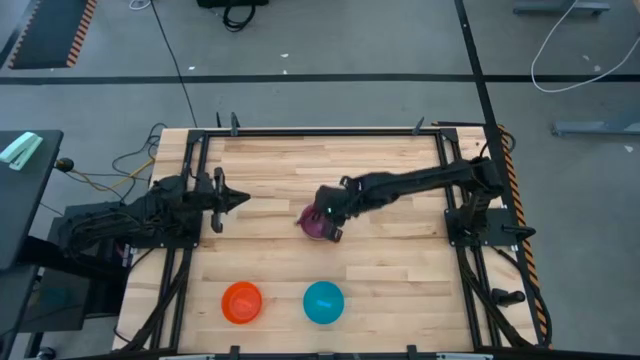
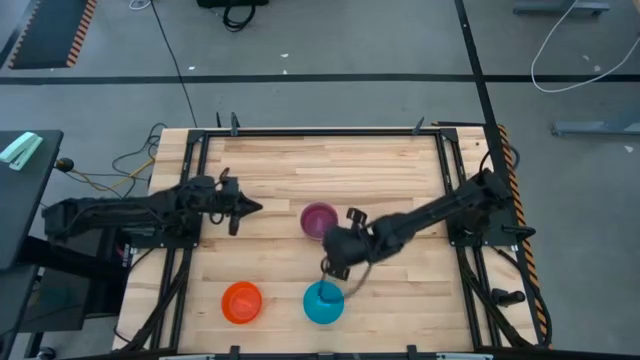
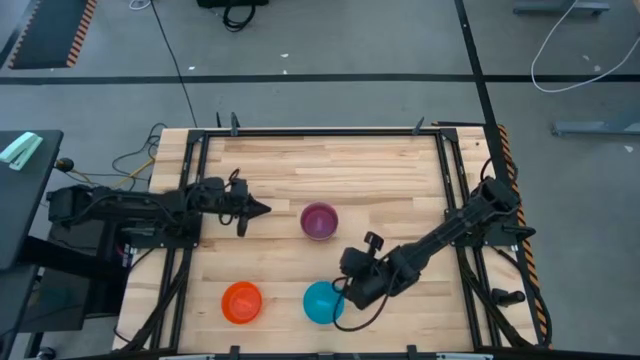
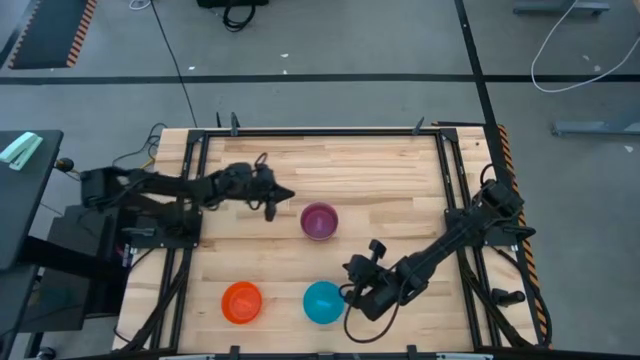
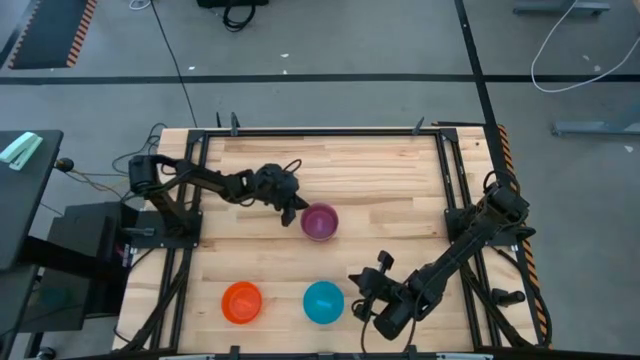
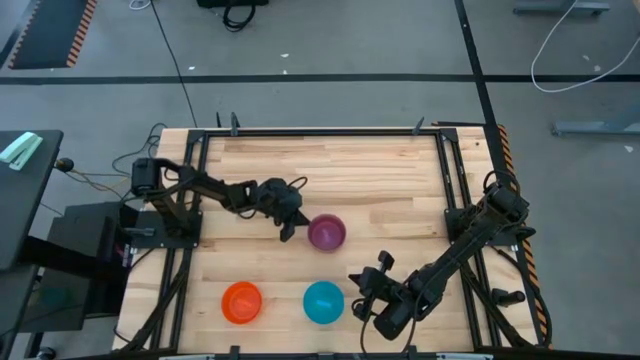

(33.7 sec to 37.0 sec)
Task: Nest bowls inside each other
Adjust the stacked bowls

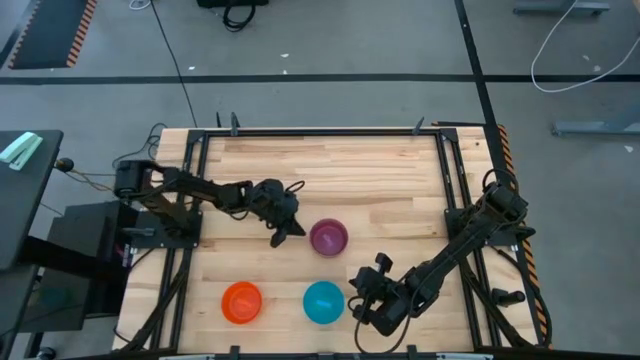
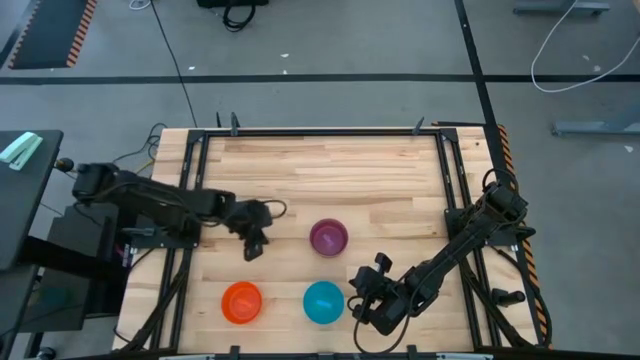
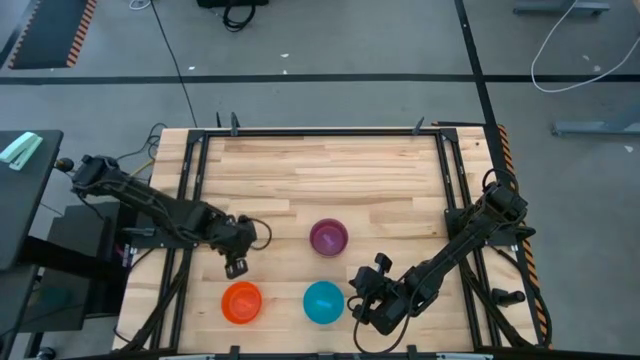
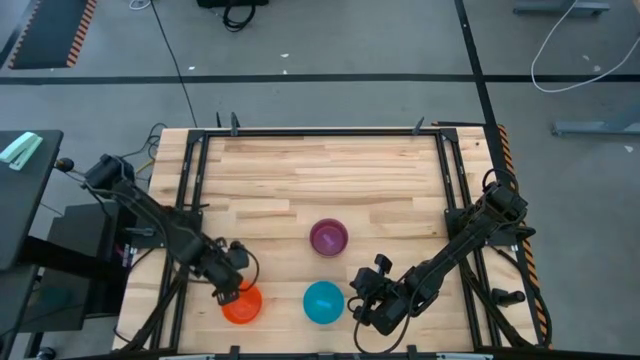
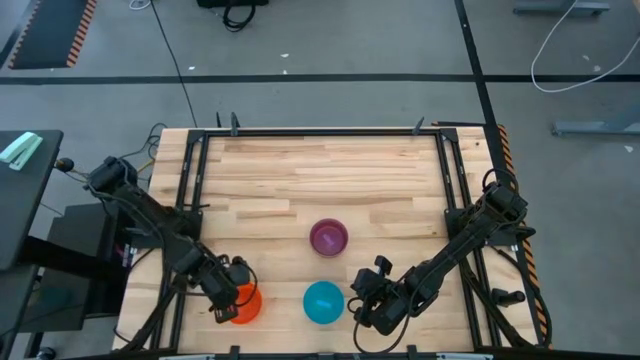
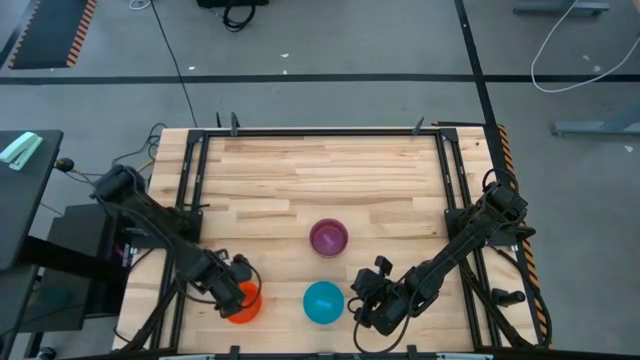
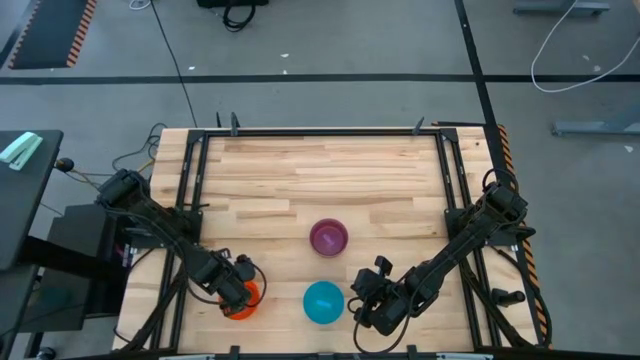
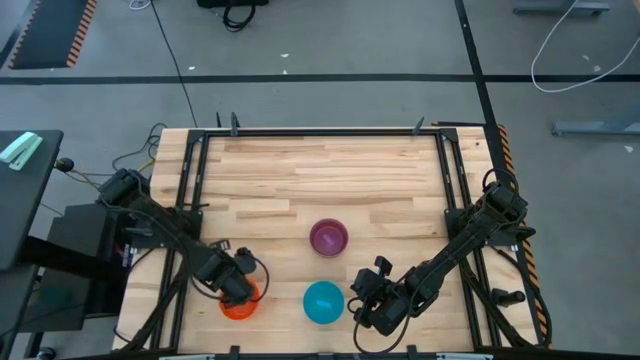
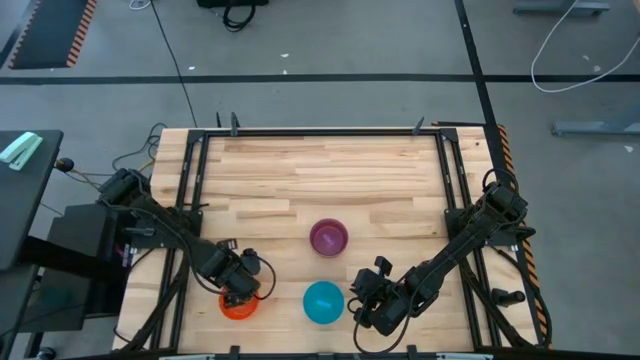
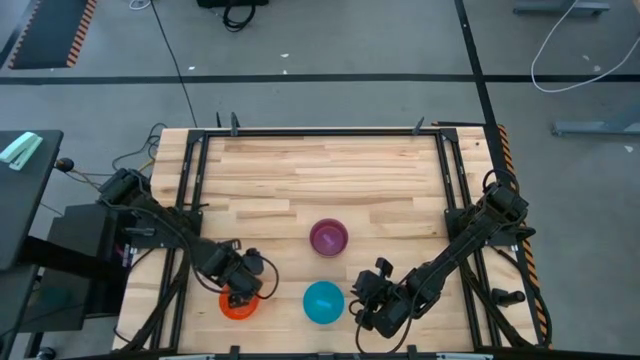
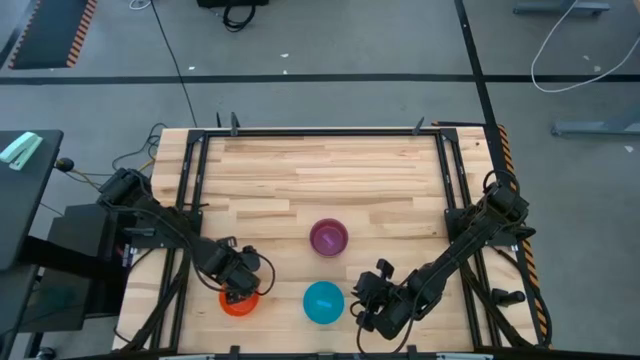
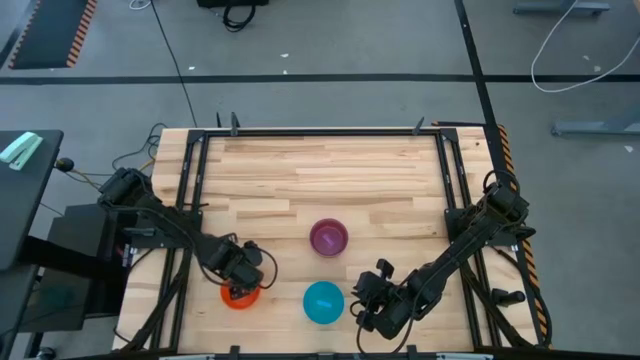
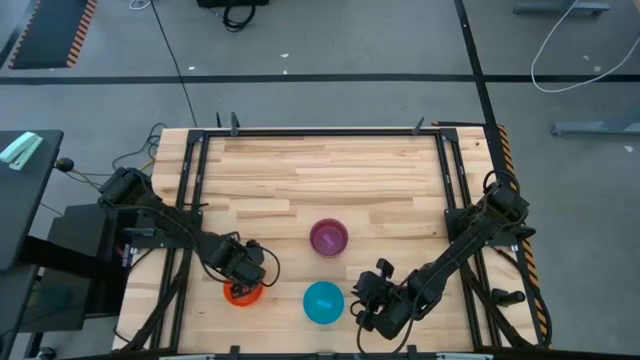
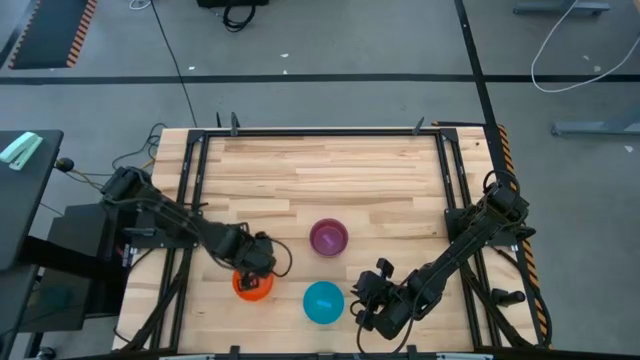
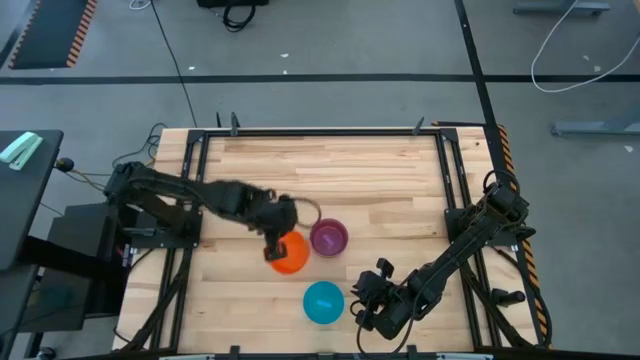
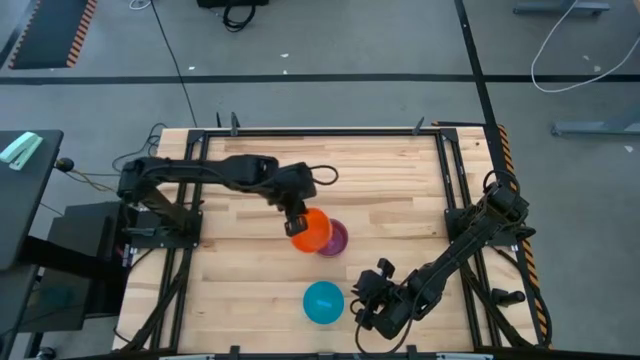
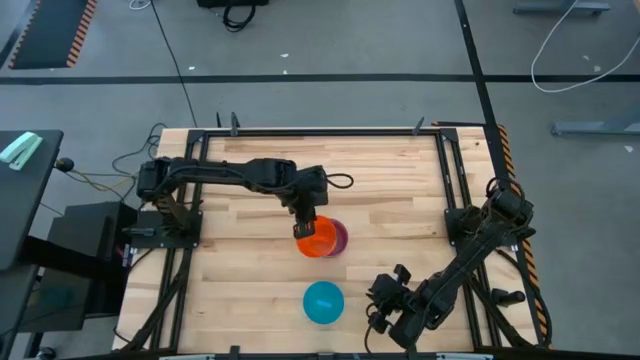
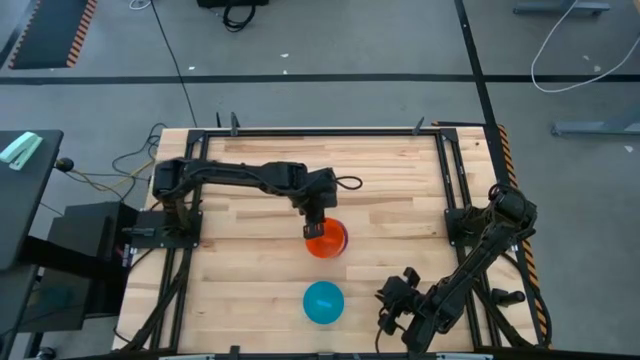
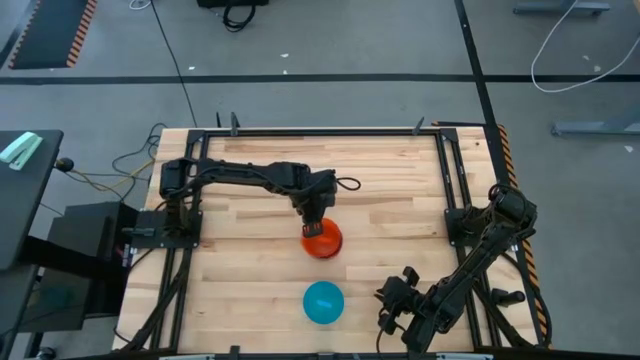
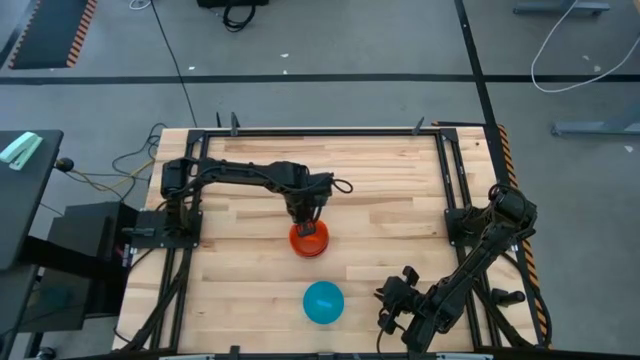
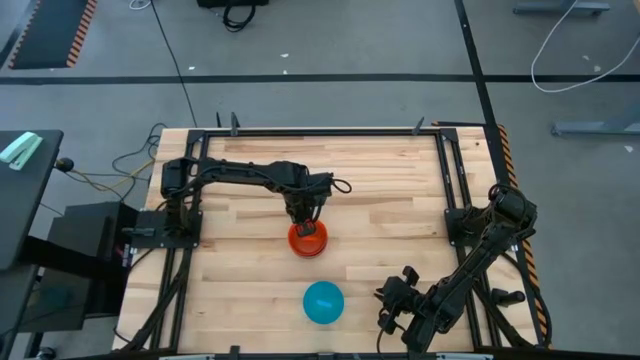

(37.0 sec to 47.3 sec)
Stack the orange bowl on top of the violet bowl

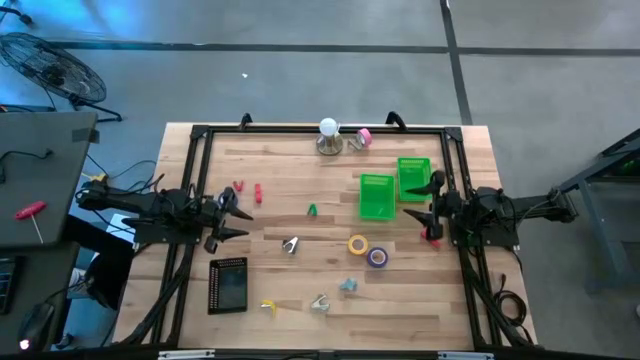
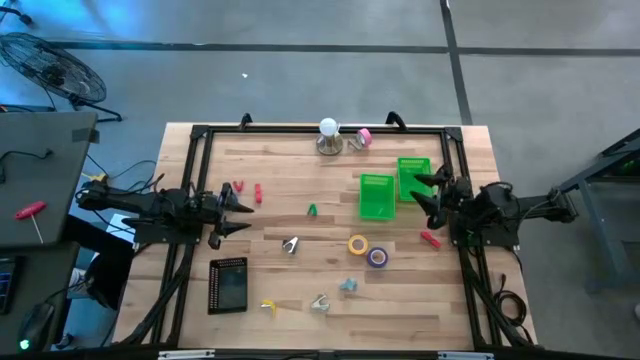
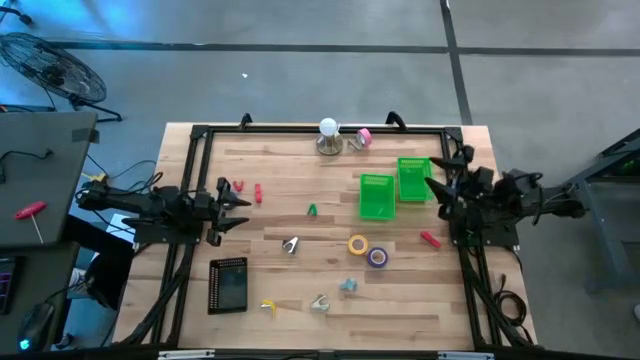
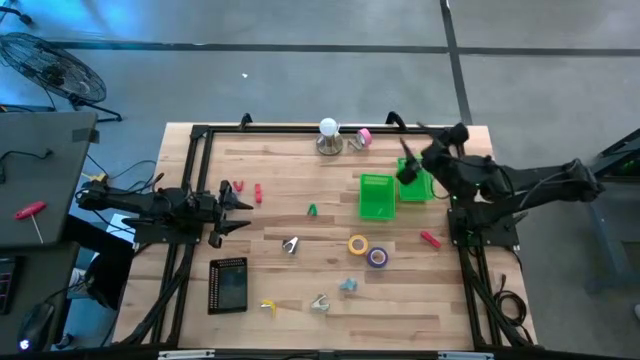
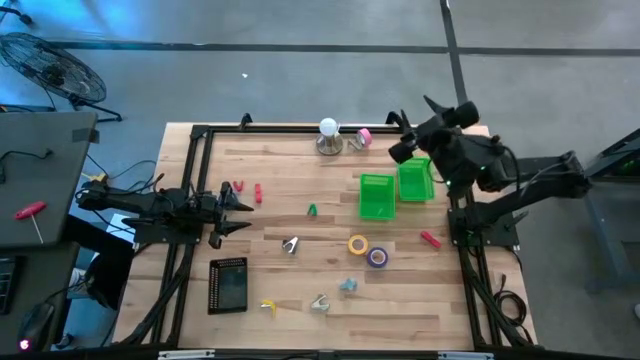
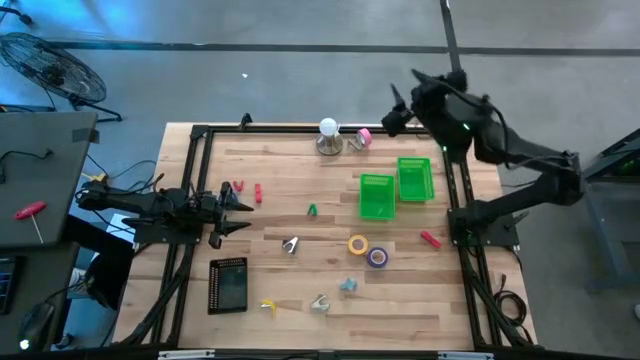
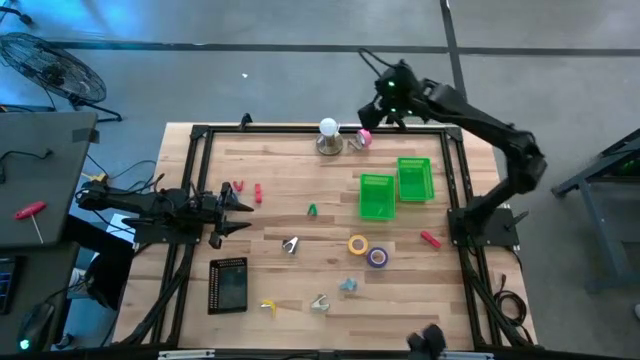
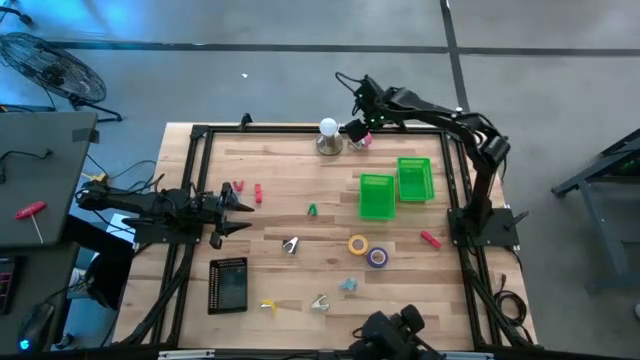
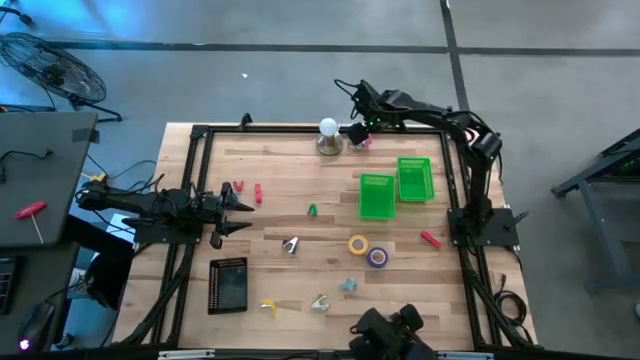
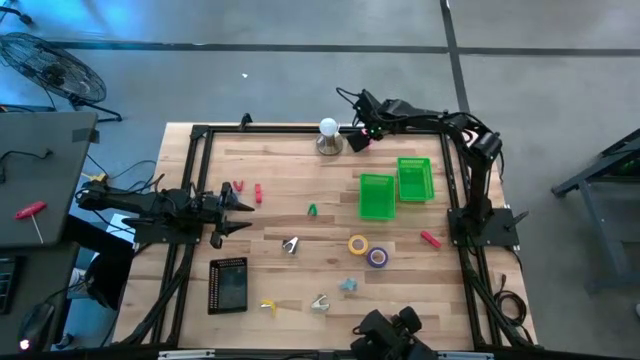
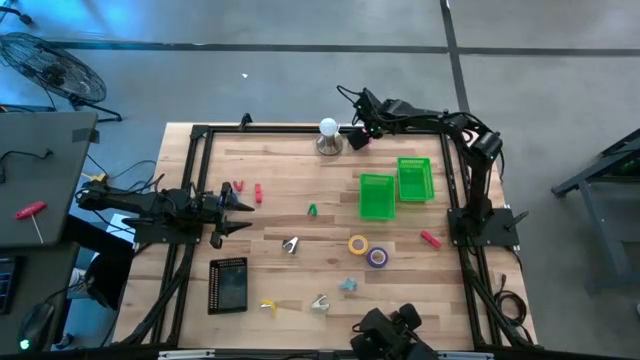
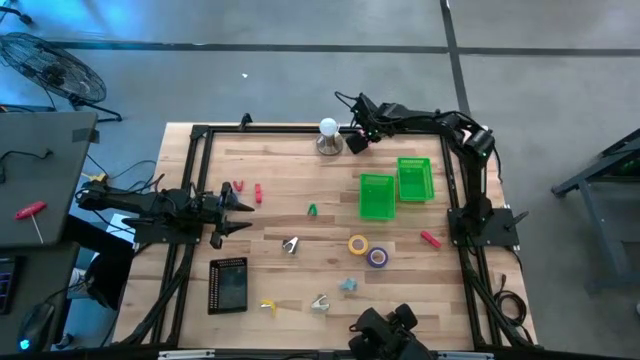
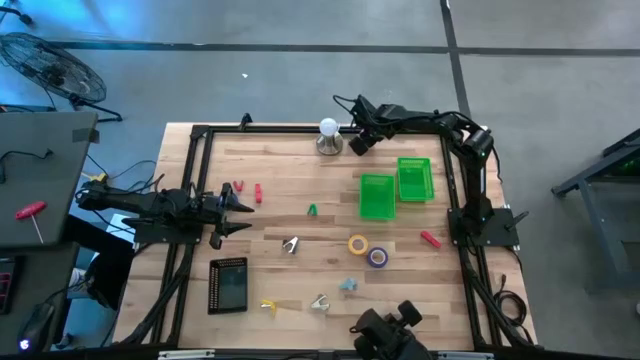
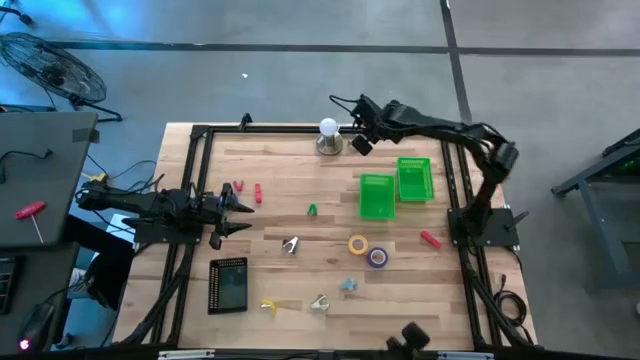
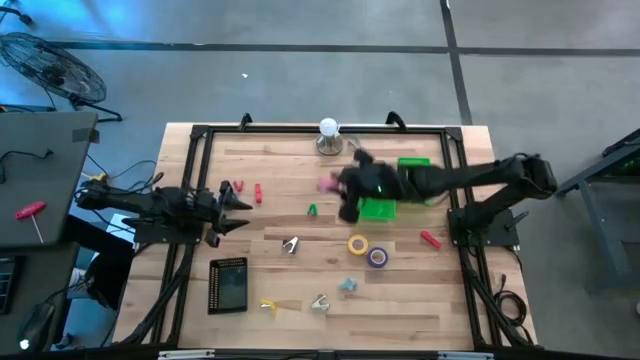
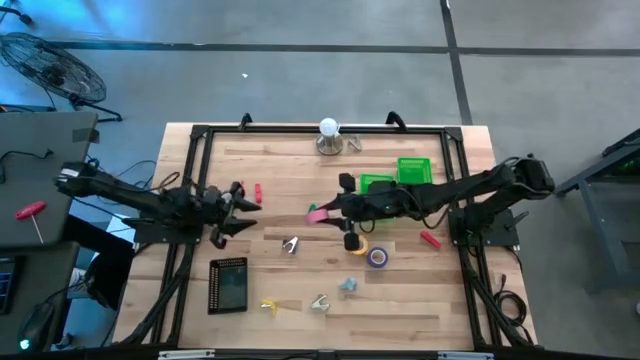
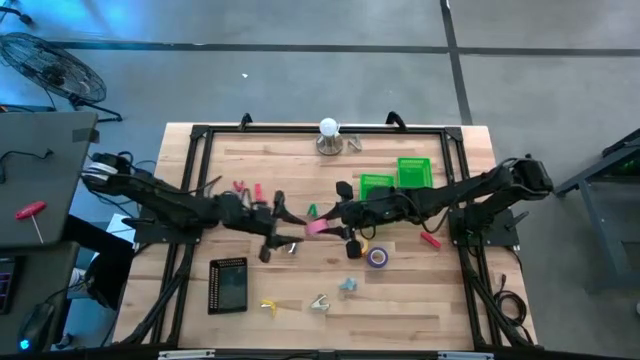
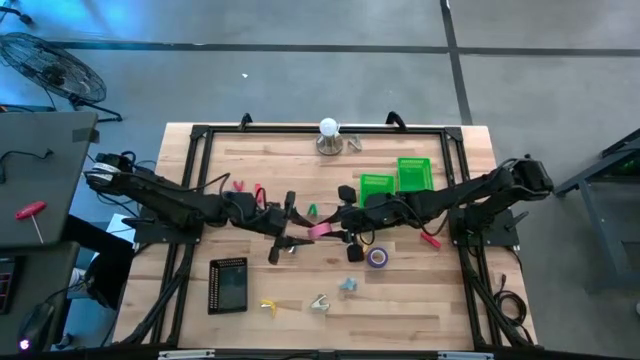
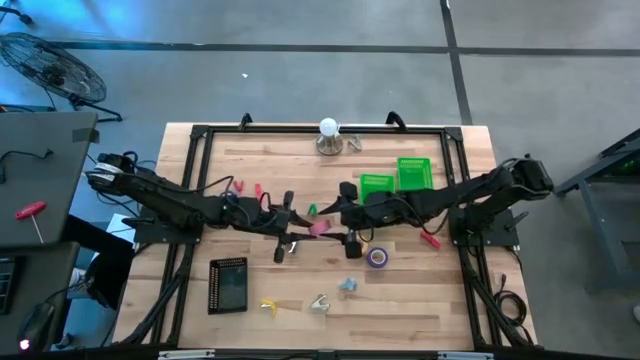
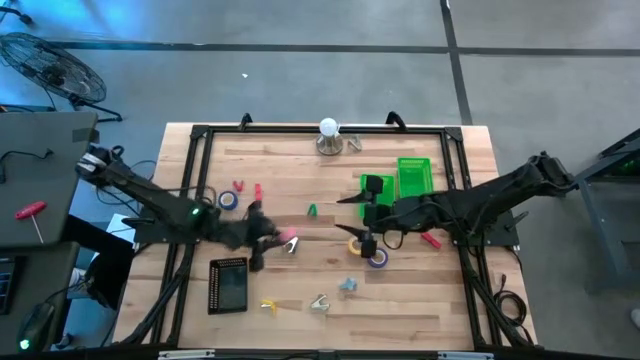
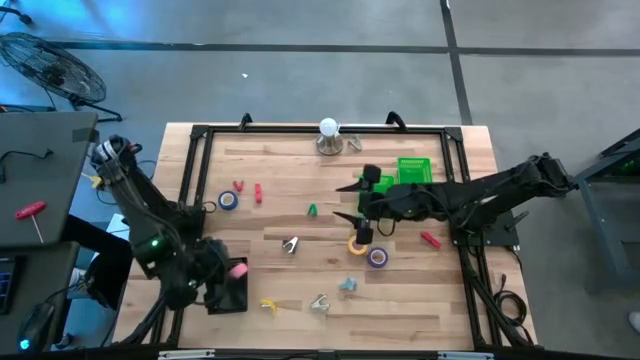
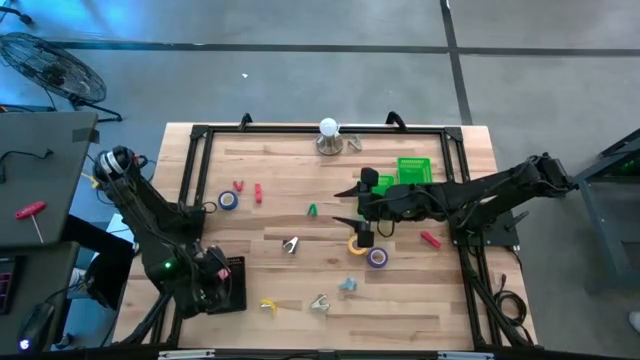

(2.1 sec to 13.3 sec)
Task: Pick and place Stapler, Stapler remover, tape
Put the pink tape into the black basket
